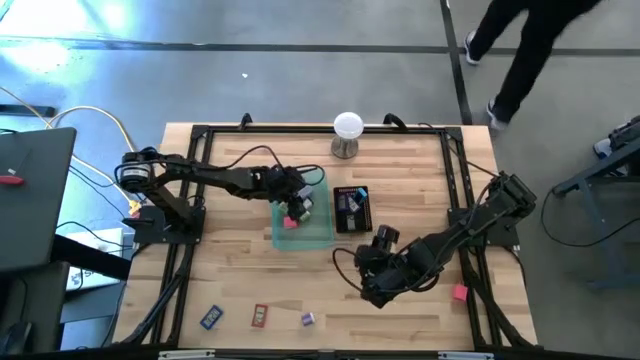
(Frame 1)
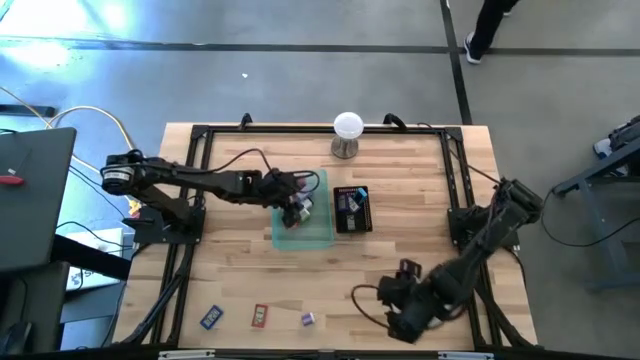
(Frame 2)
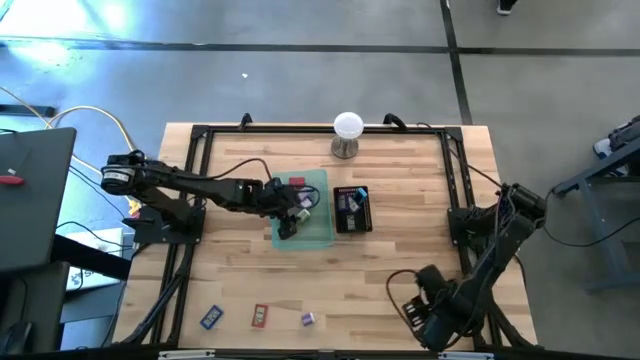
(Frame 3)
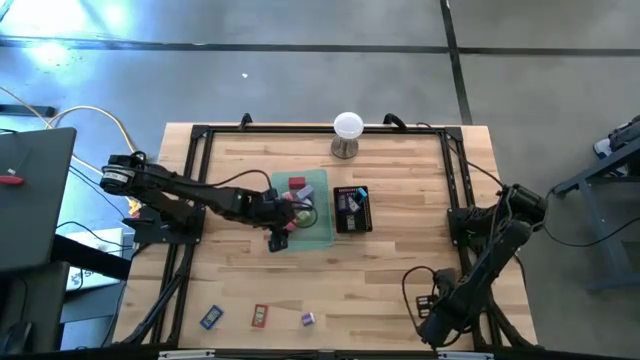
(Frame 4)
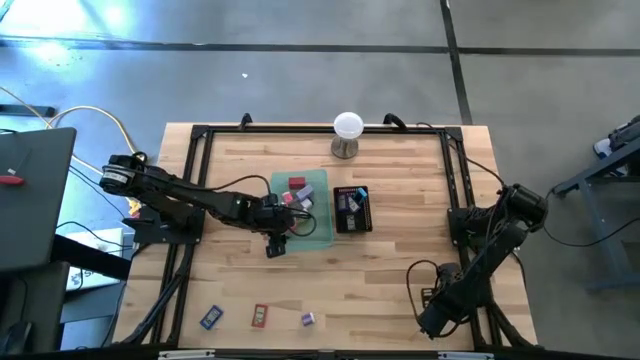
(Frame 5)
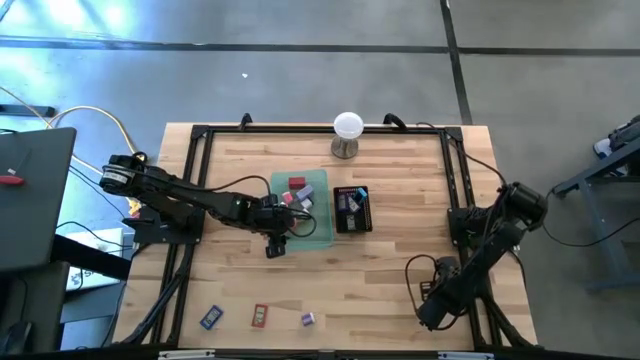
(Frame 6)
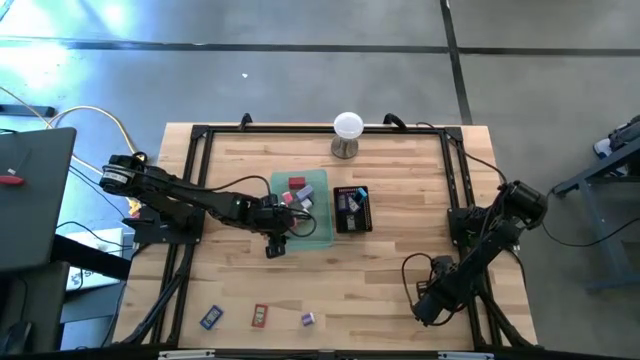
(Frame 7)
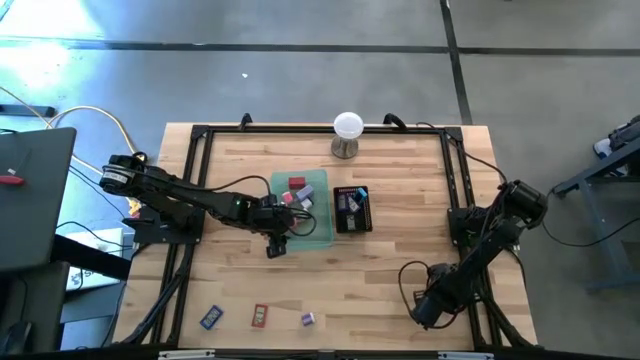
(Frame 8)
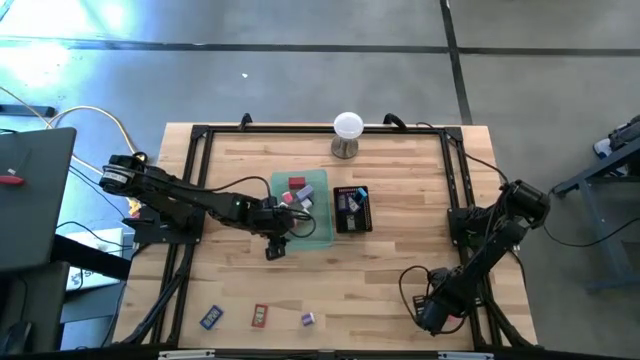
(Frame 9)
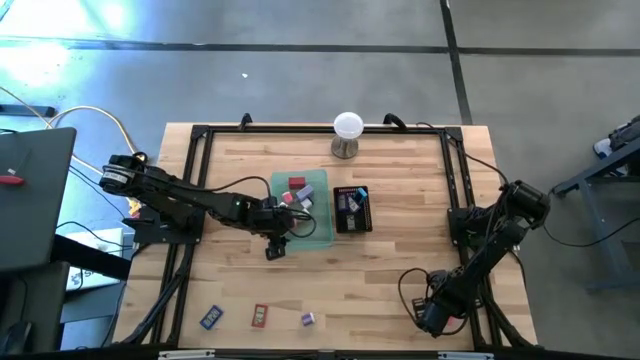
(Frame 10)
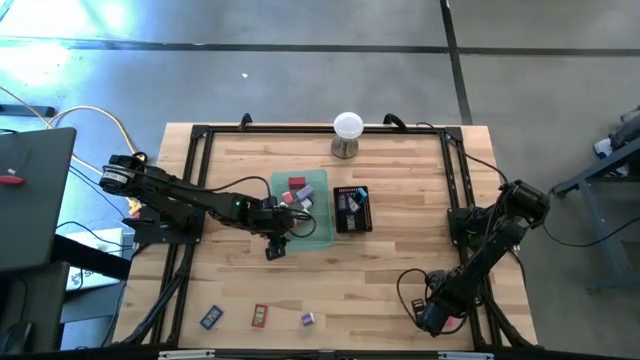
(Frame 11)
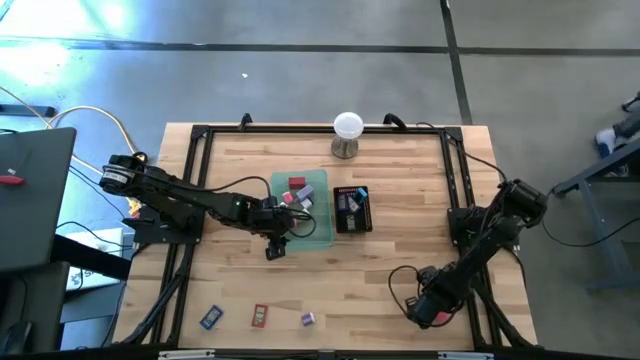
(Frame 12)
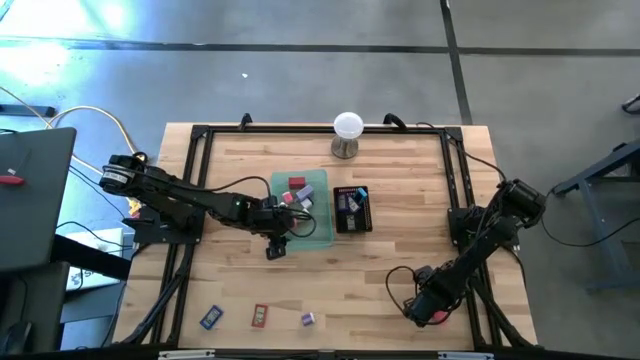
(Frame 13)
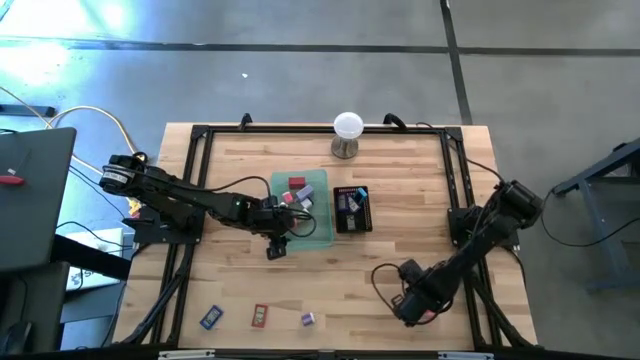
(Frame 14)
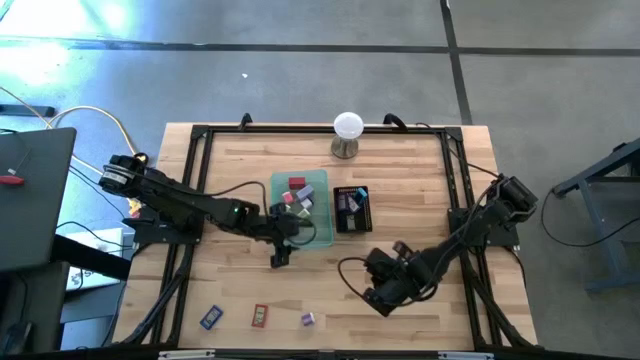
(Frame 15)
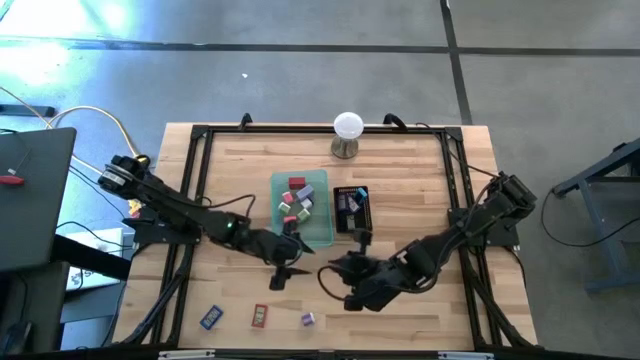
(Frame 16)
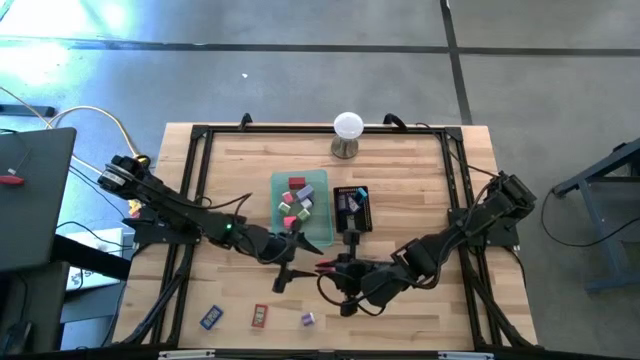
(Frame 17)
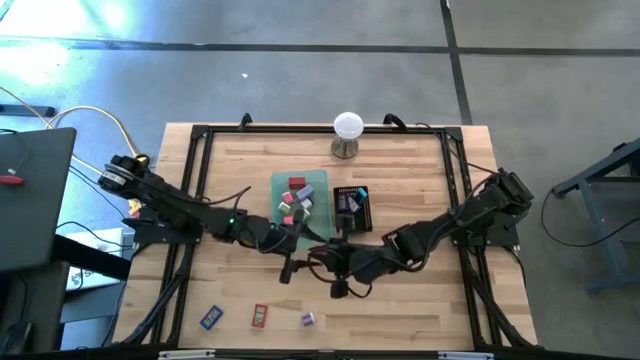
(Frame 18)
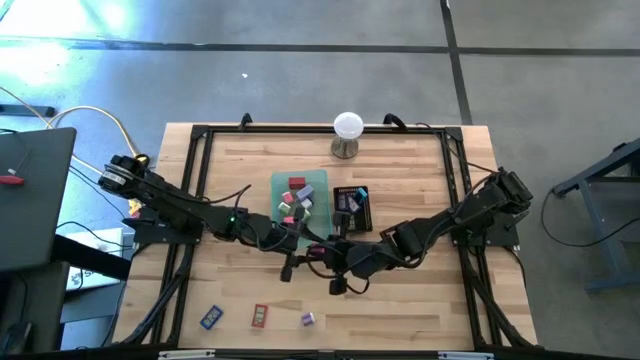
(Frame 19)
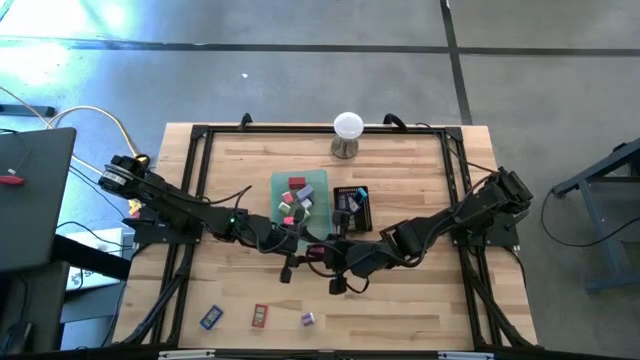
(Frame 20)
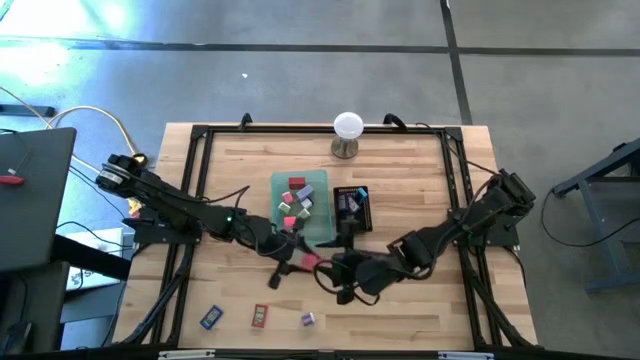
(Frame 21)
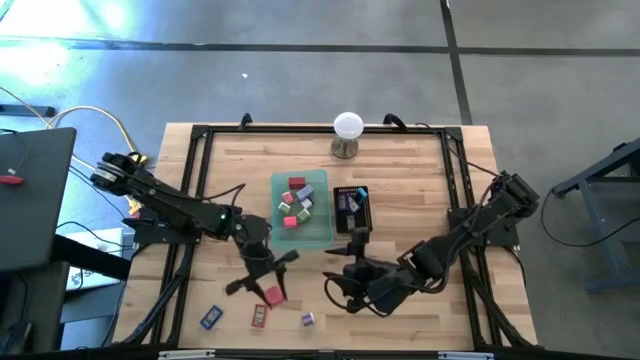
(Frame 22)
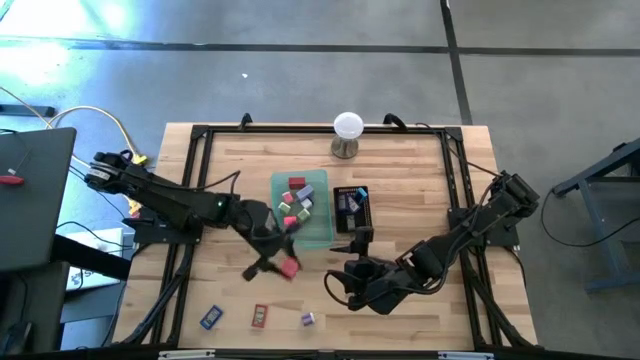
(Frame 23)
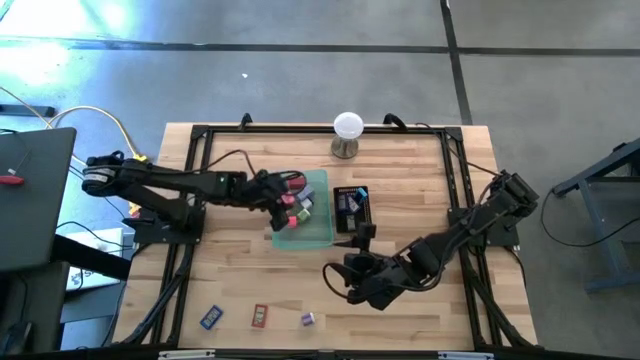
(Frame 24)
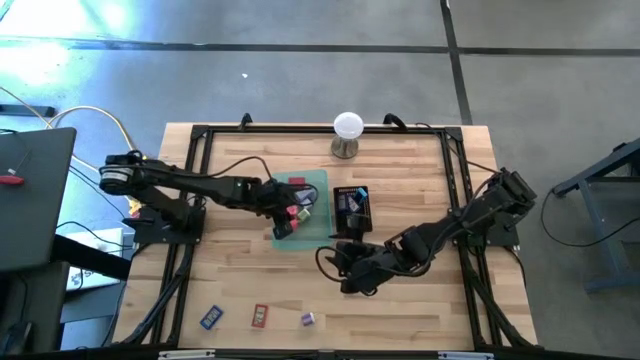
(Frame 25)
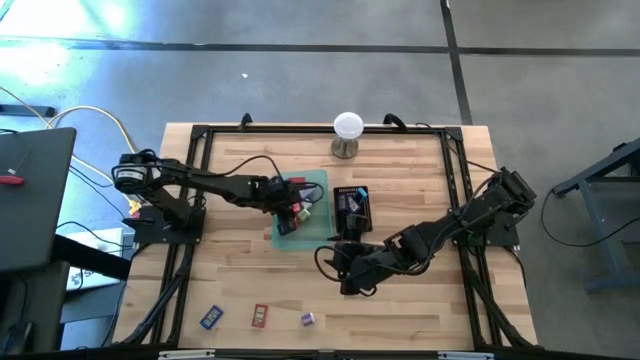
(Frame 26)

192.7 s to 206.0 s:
Task: Pick & Place Office items
Put the pink charger adapter into the blue bin

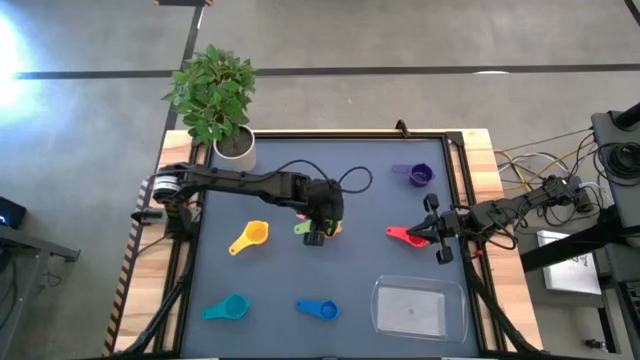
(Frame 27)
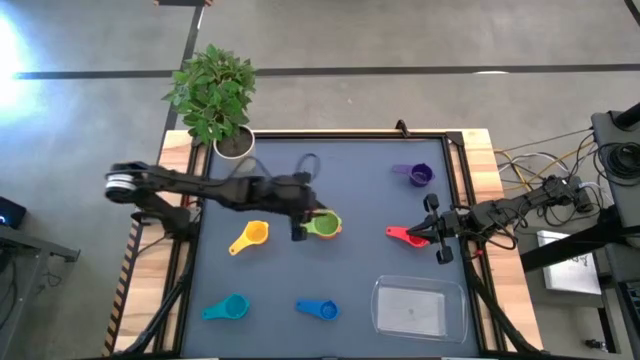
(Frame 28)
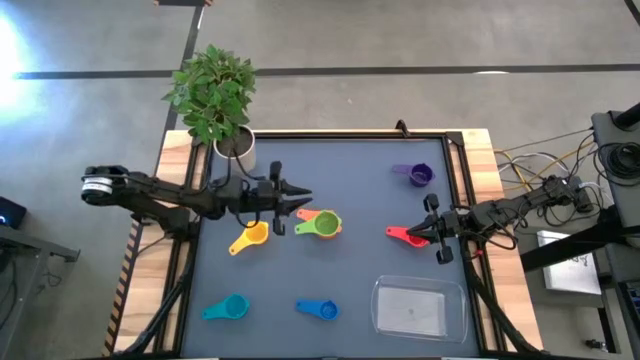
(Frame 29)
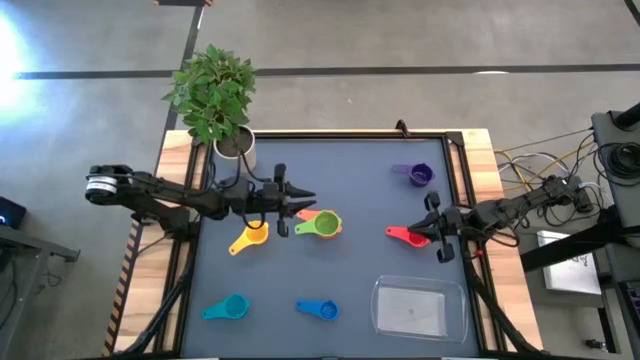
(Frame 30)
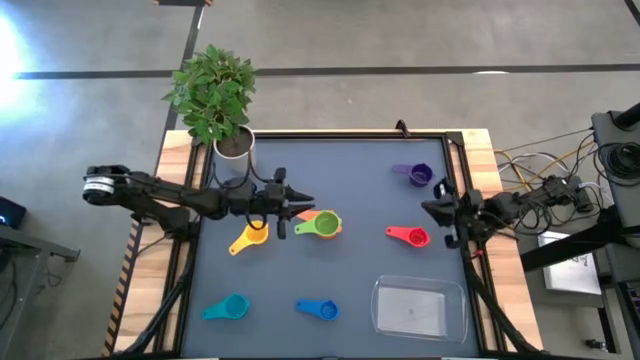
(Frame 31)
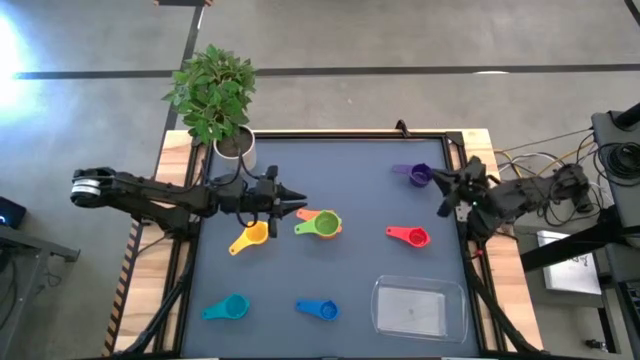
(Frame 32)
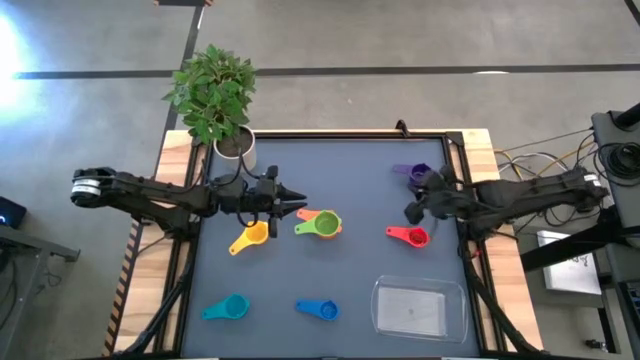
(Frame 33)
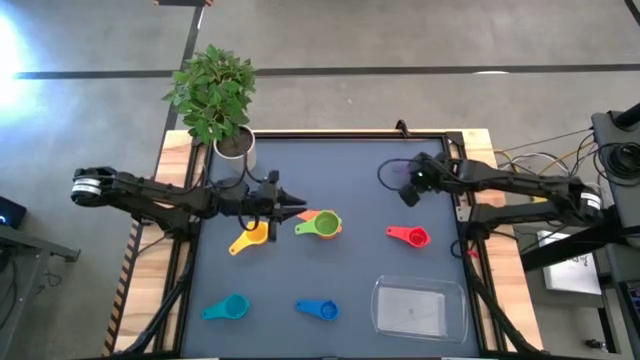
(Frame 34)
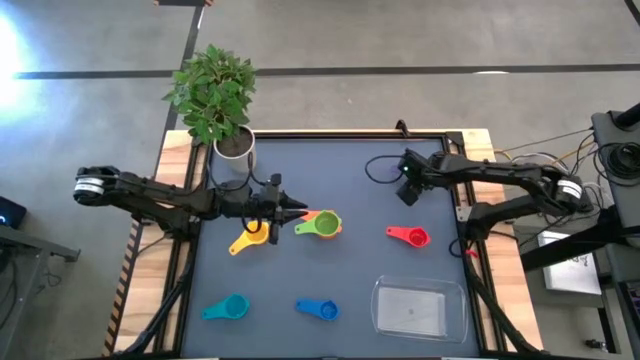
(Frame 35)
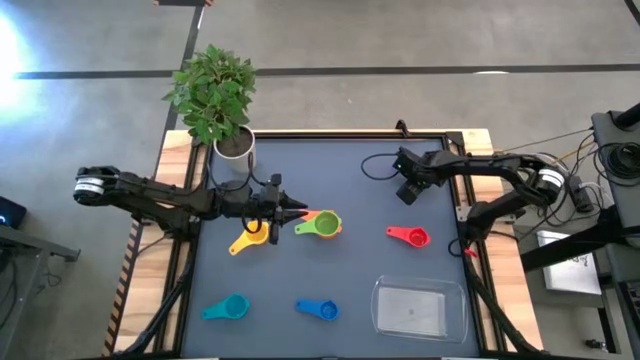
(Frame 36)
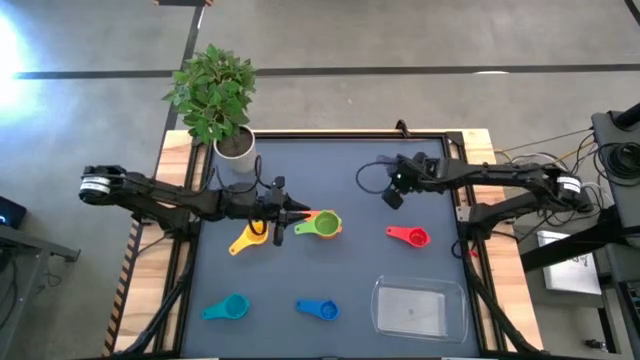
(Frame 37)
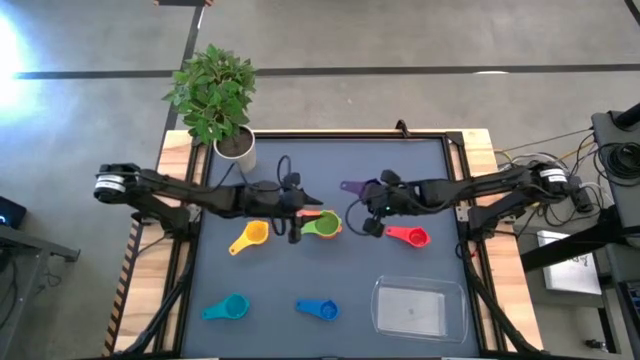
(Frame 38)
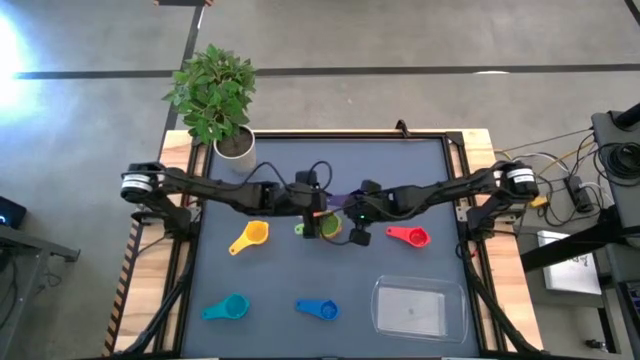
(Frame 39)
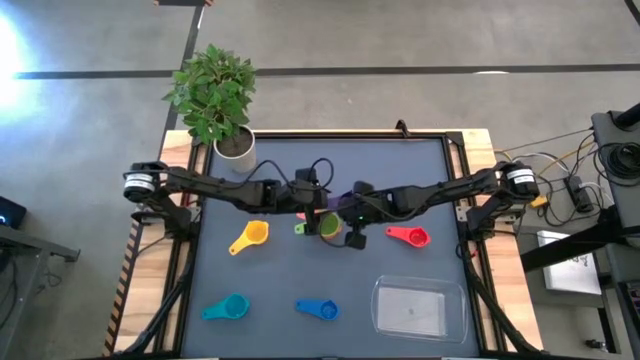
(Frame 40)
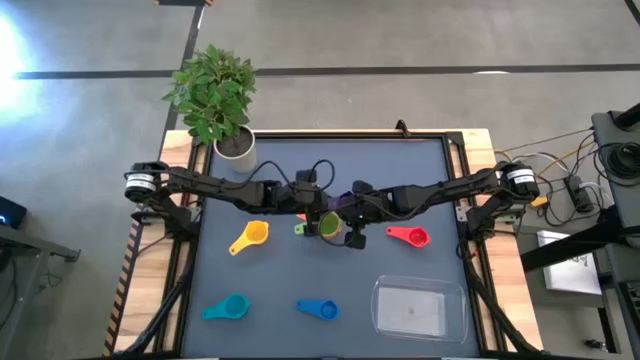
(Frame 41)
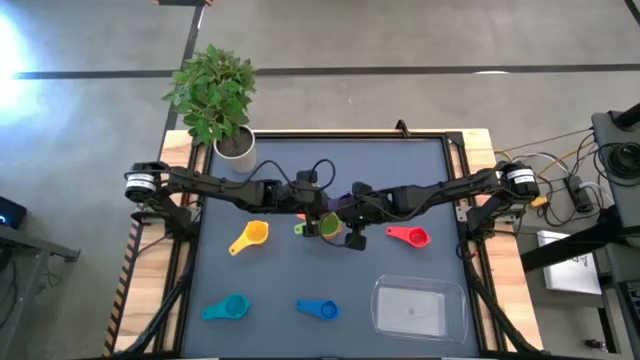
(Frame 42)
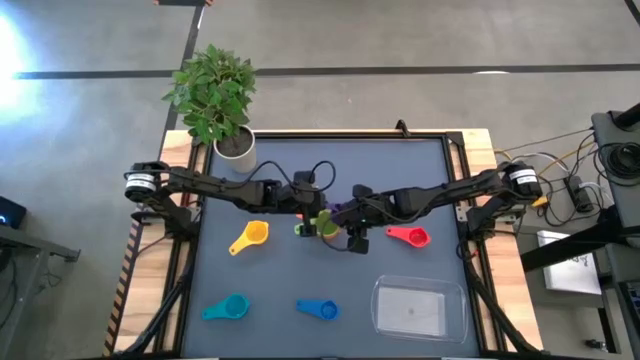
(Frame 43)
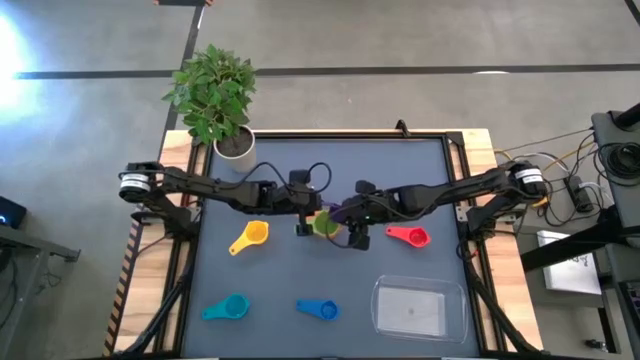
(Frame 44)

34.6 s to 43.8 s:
Task: Nest measuring cups in basket
Stack the purple measuring cup on top of the green measuring cup
